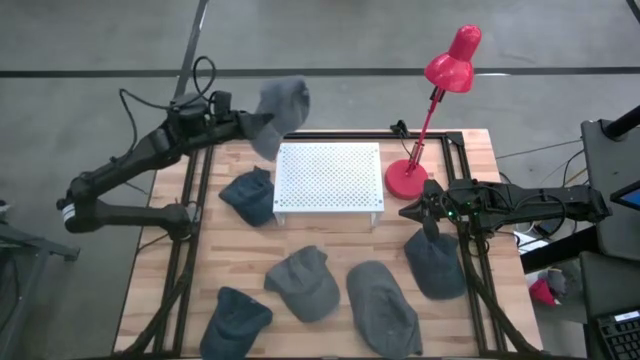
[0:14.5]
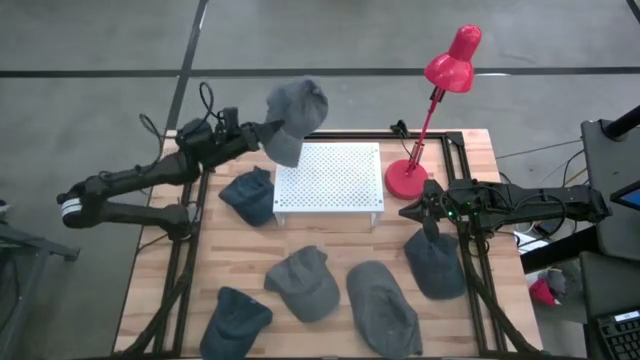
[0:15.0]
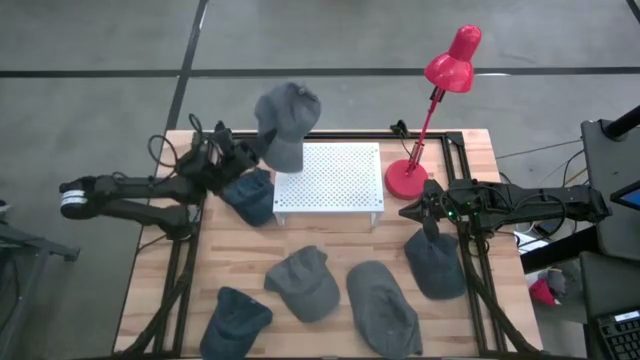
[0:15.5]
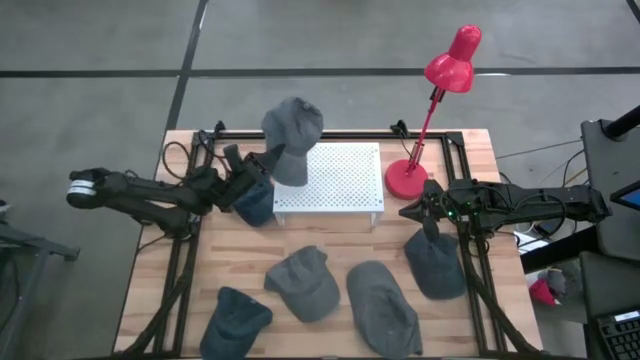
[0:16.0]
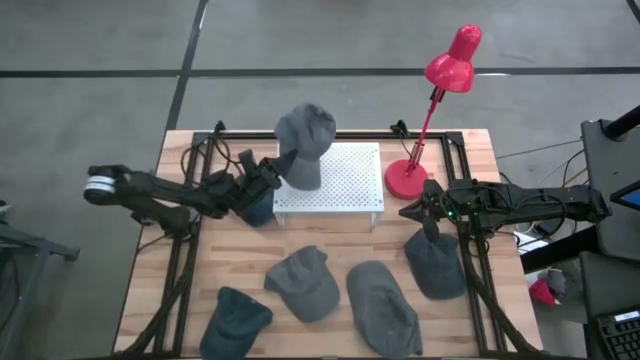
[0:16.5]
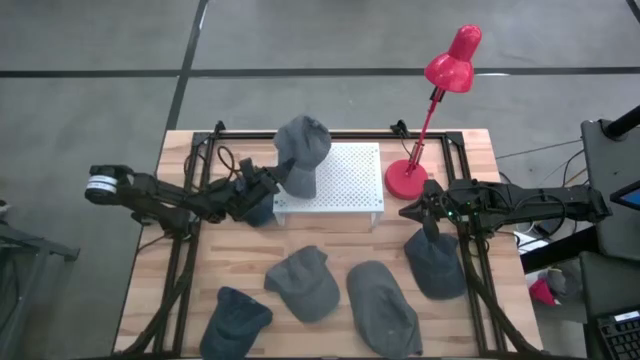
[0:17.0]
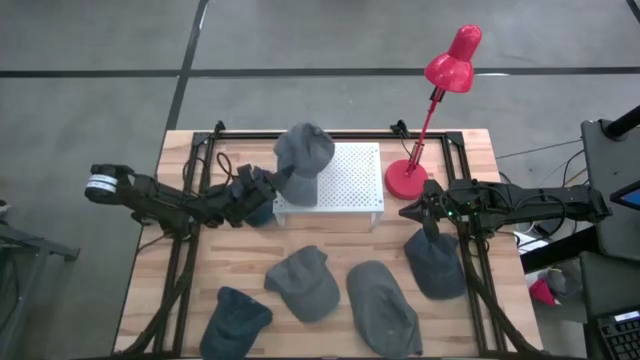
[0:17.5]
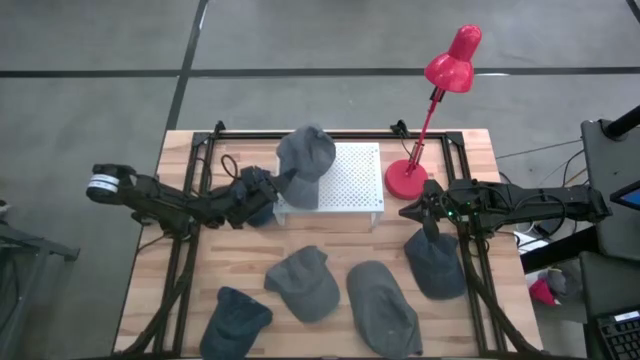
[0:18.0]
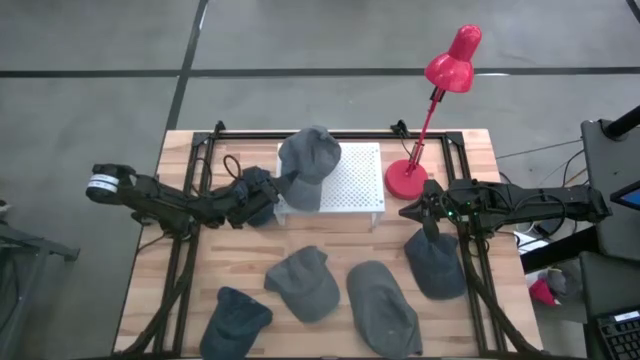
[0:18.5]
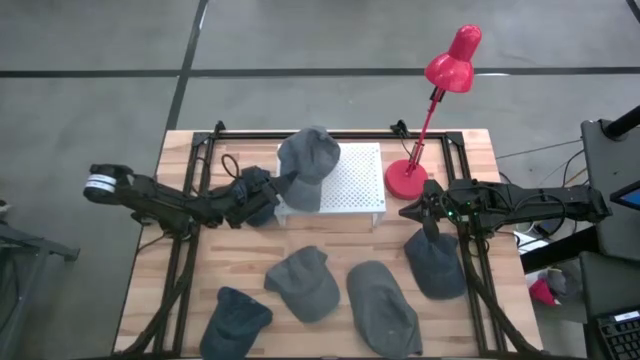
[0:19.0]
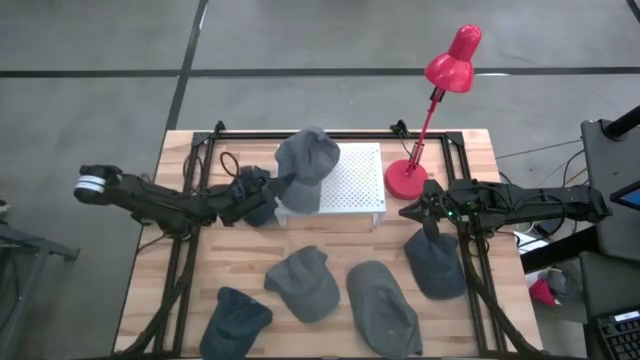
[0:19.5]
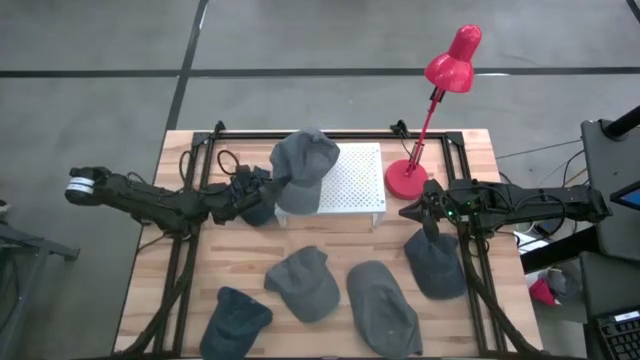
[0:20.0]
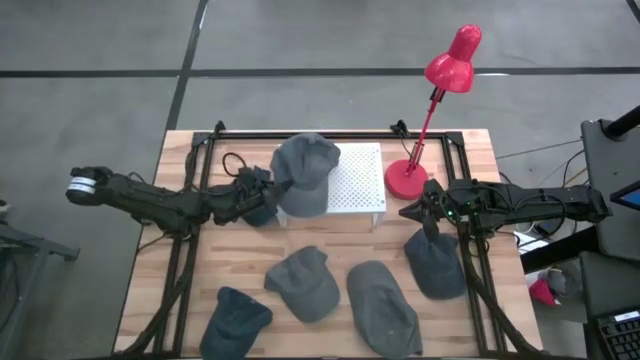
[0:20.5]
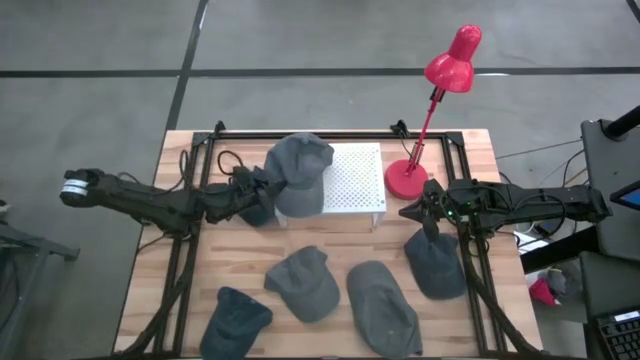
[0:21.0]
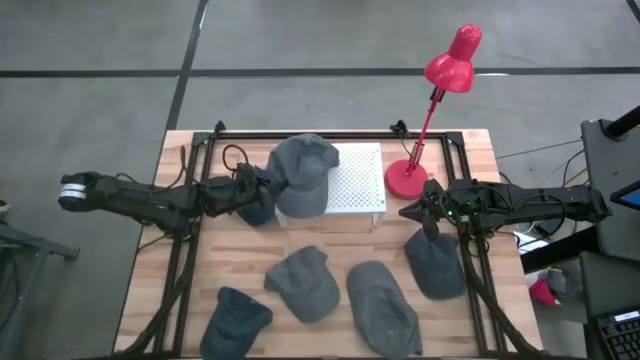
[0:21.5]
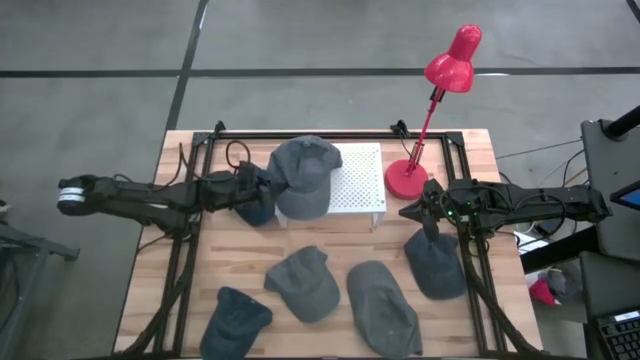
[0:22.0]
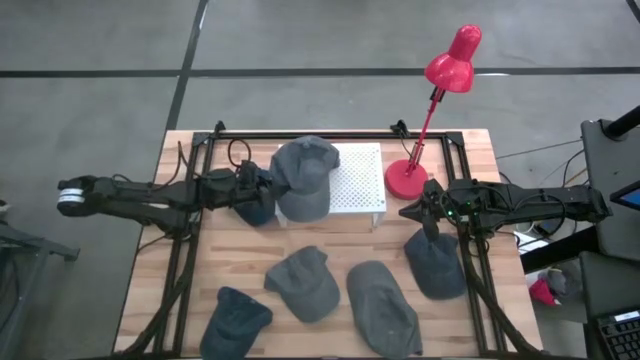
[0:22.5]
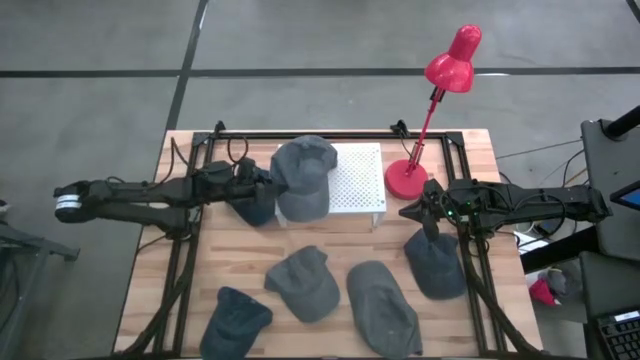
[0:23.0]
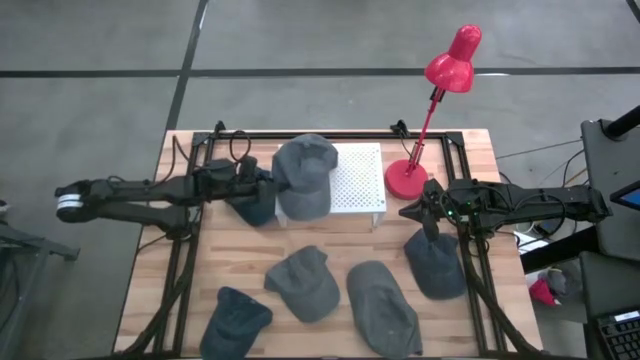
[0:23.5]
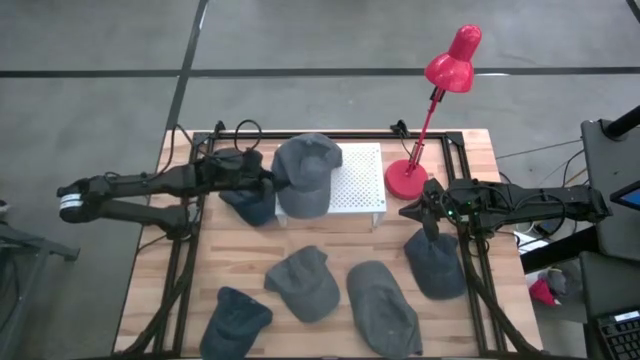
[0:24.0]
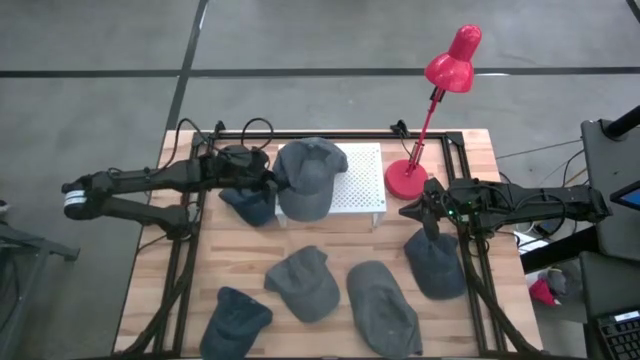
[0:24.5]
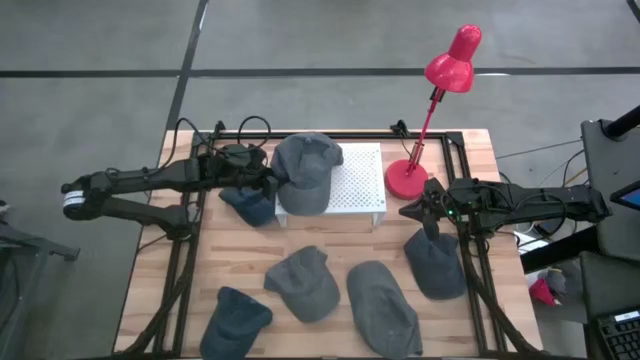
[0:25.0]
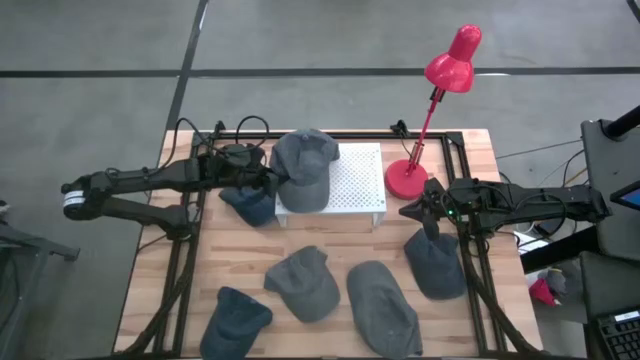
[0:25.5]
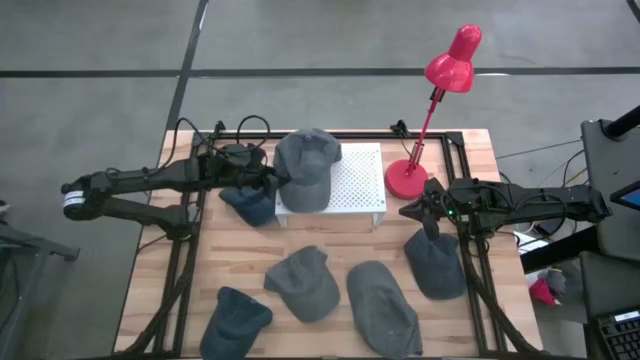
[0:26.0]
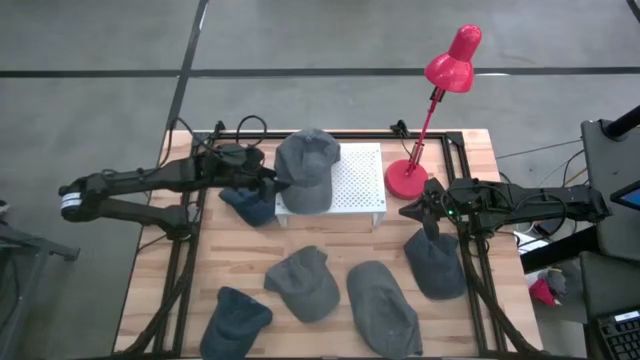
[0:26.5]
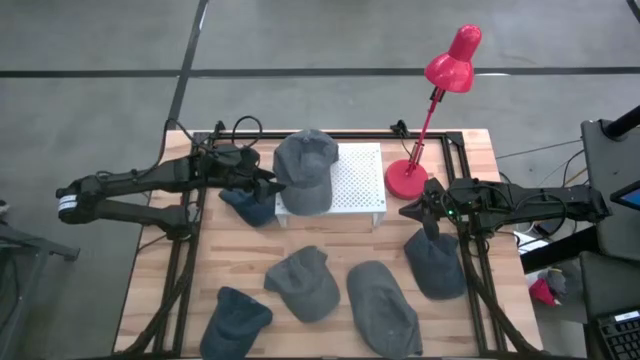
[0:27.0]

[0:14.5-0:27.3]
Task: Pick & Place hat
Put the top left gray cap on the shelf

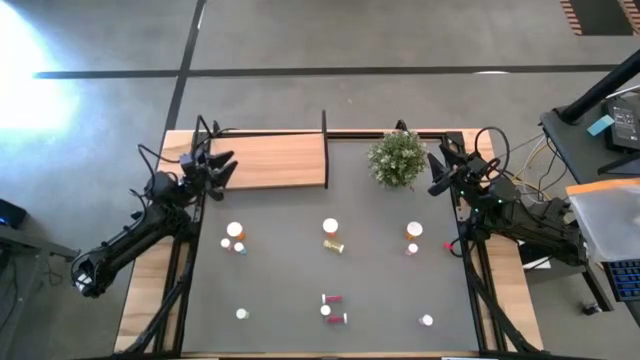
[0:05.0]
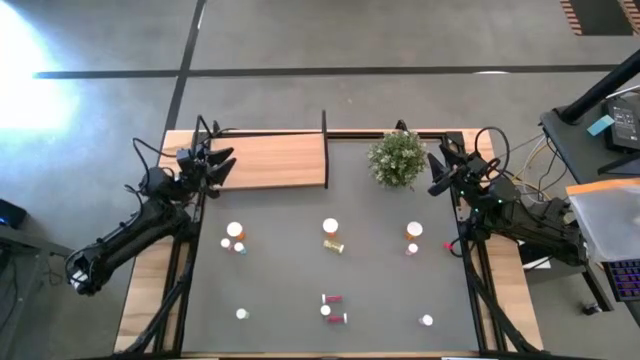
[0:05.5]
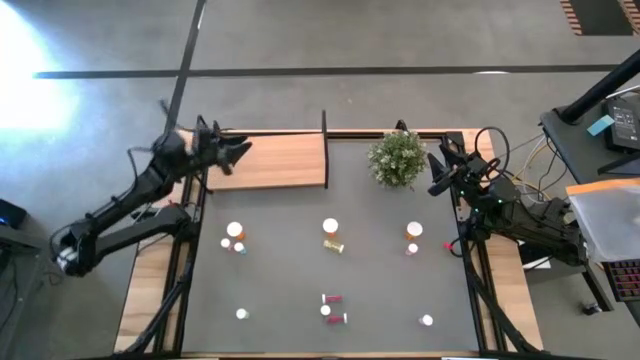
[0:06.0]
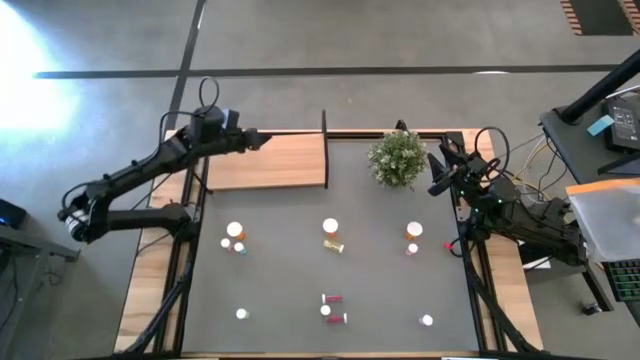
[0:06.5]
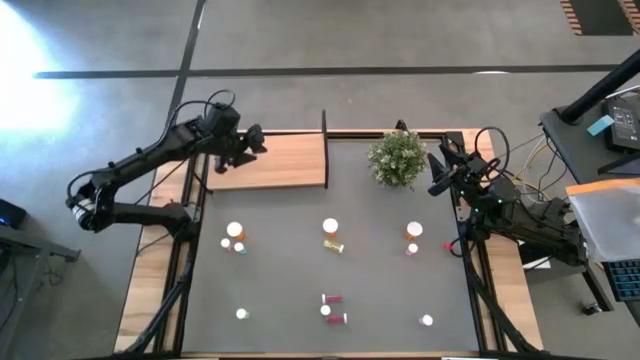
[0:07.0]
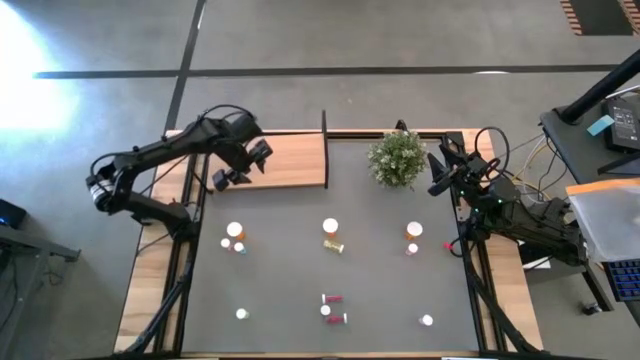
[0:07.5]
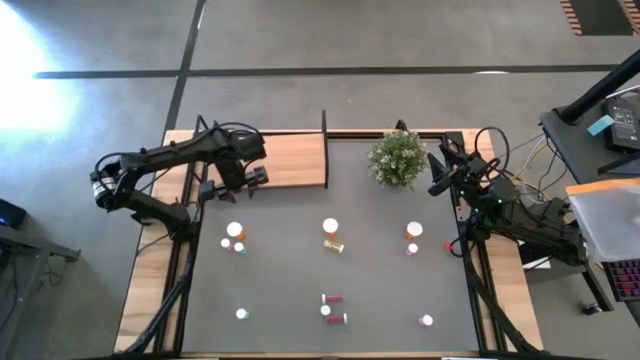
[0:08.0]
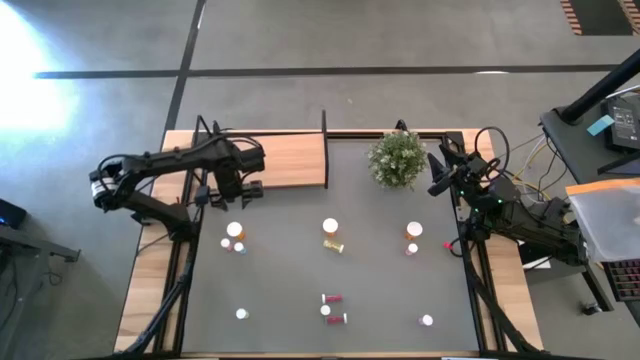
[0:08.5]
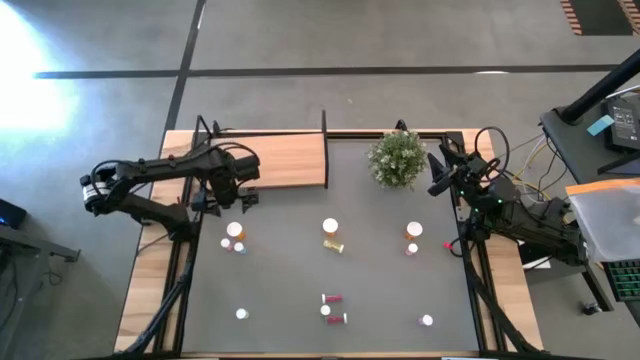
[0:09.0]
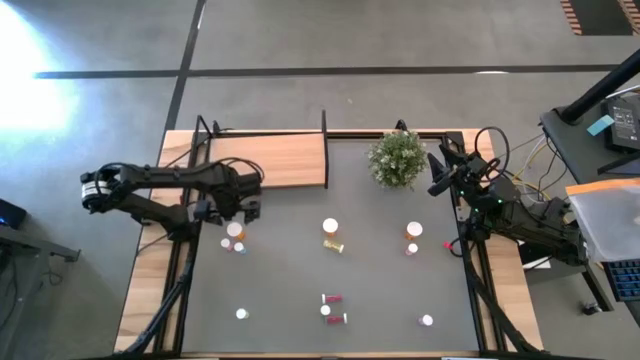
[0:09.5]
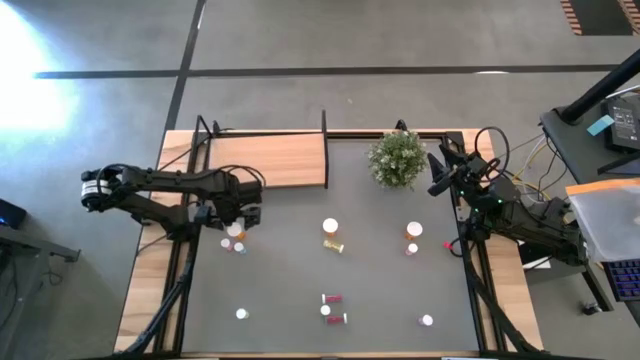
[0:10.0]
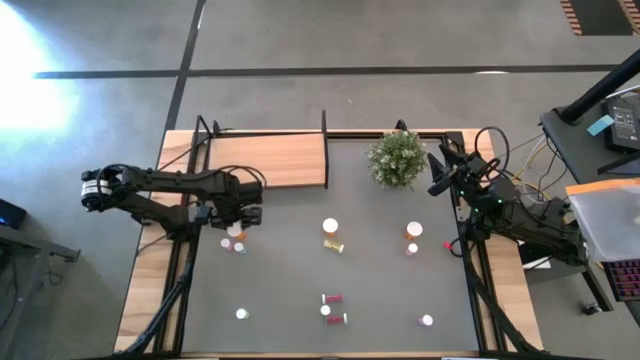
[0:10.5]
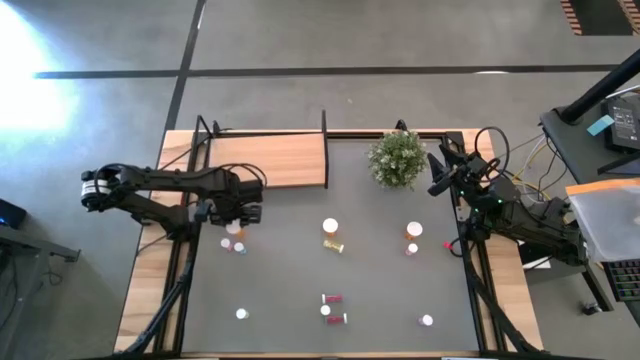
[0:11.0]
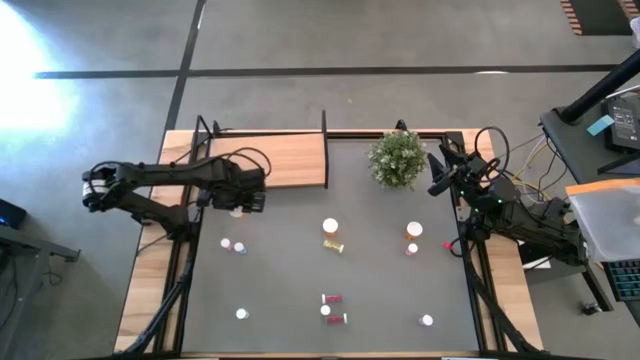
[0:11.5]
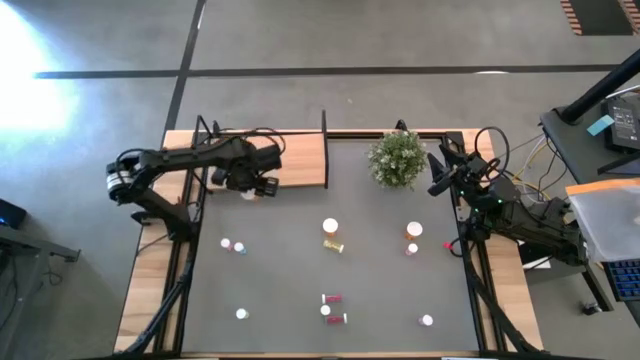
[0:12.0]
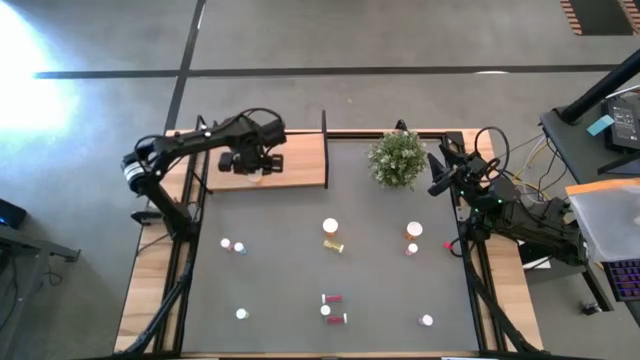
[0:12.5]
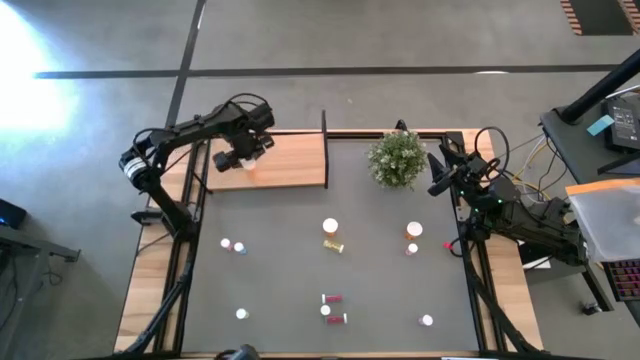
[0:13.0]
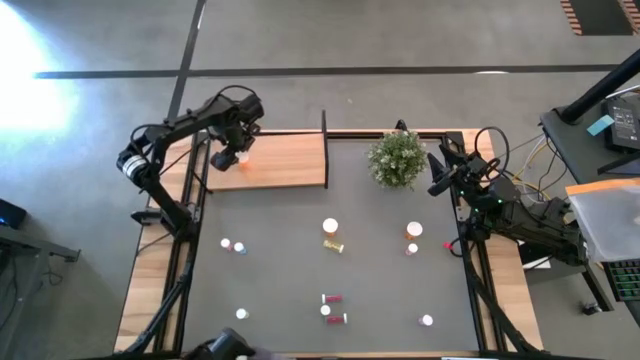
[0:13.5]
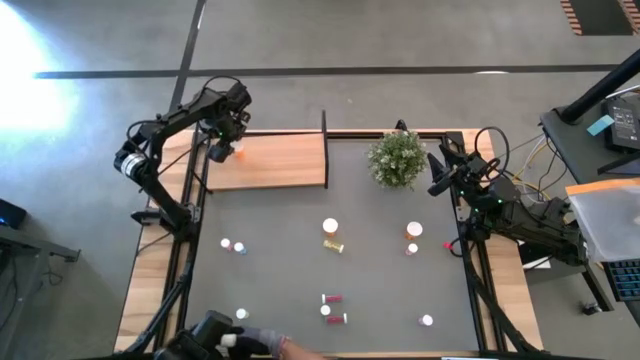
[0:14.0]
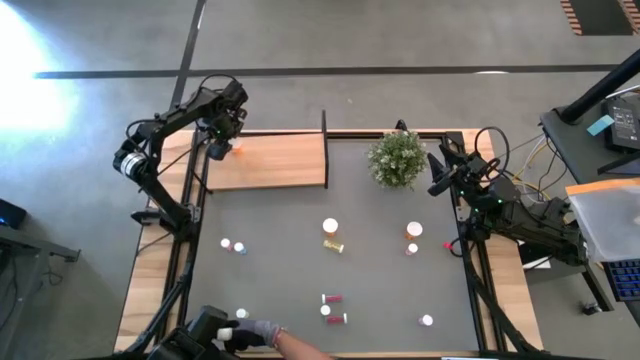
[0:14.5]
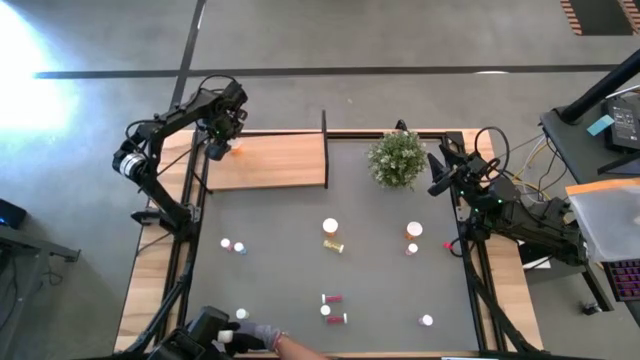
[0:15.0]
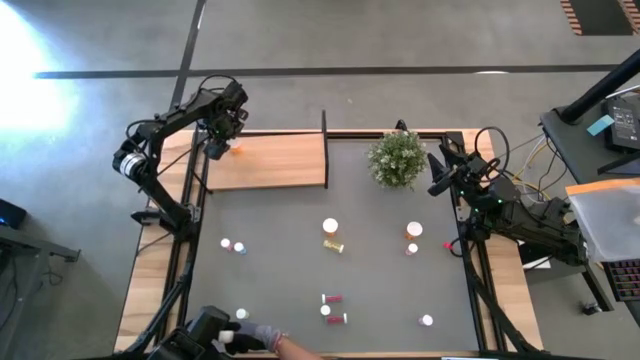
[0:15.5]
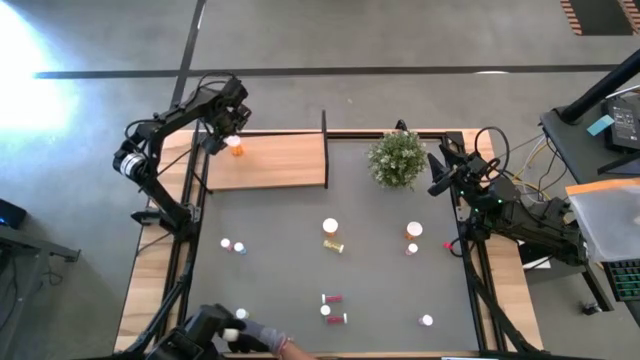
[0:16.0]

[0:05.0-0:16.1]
Task: Pick and place medicine bottles onto shelf by color
Put the left large orange pill bottle on the shelf
